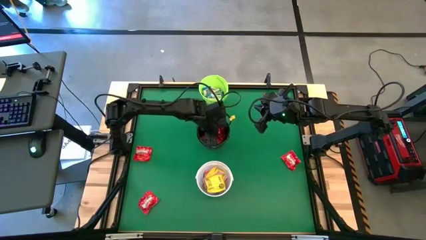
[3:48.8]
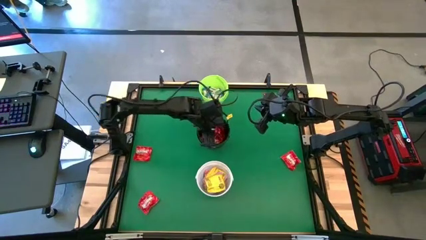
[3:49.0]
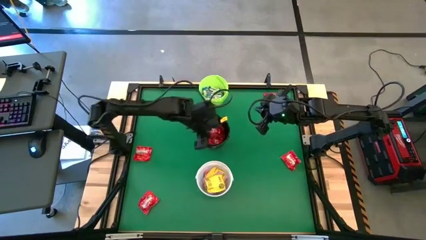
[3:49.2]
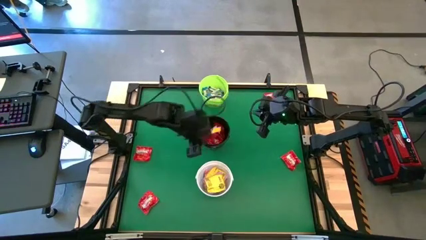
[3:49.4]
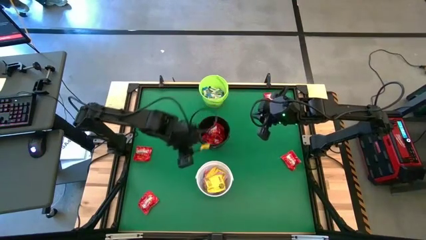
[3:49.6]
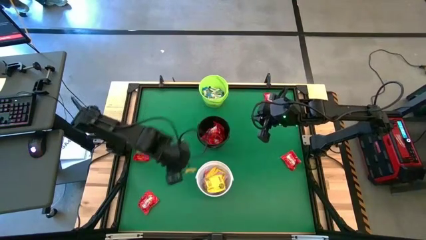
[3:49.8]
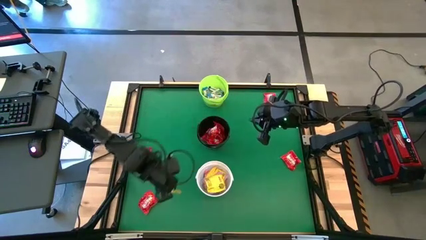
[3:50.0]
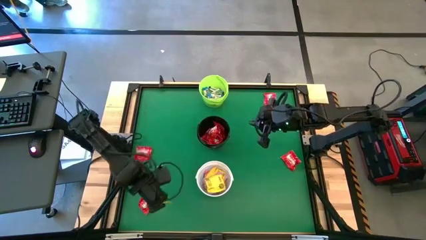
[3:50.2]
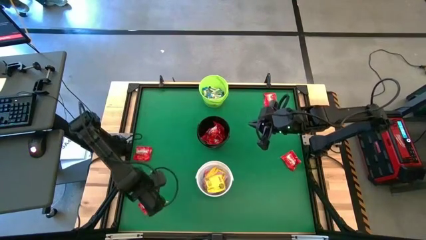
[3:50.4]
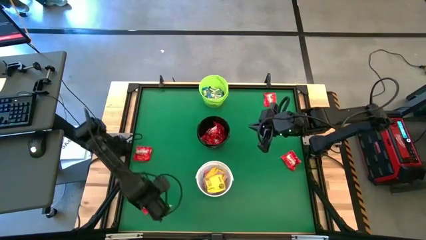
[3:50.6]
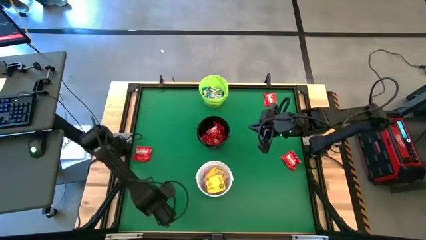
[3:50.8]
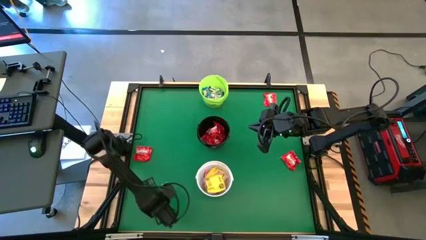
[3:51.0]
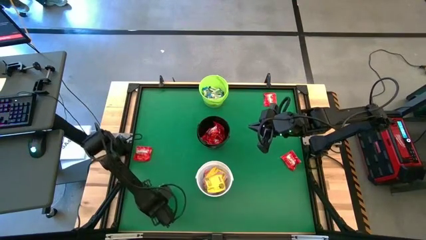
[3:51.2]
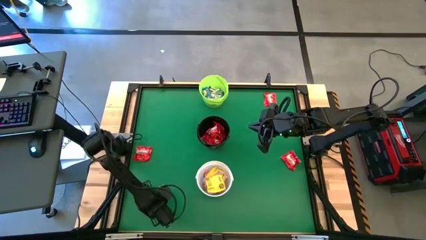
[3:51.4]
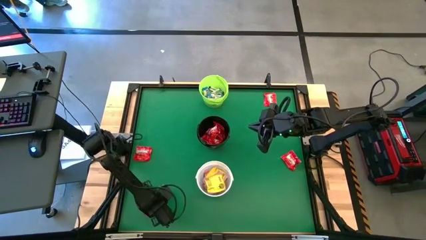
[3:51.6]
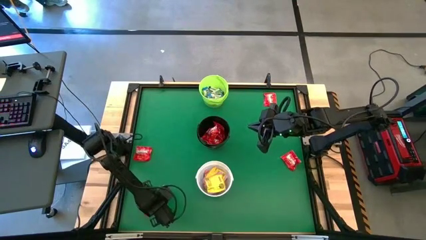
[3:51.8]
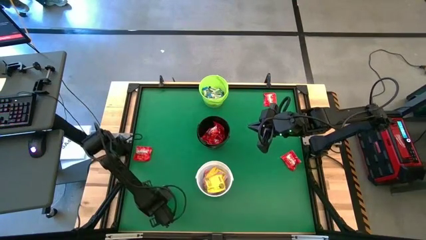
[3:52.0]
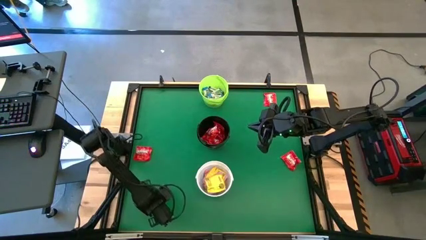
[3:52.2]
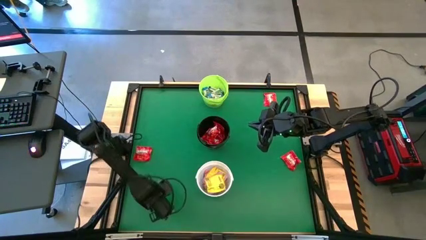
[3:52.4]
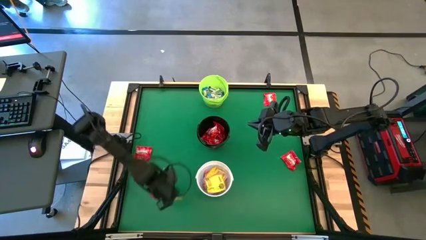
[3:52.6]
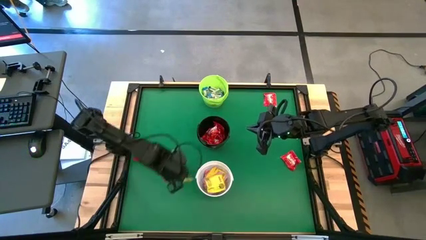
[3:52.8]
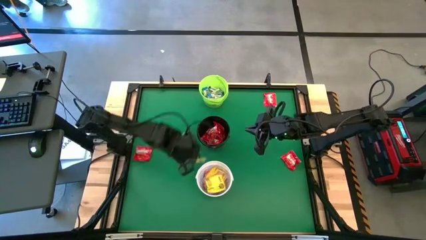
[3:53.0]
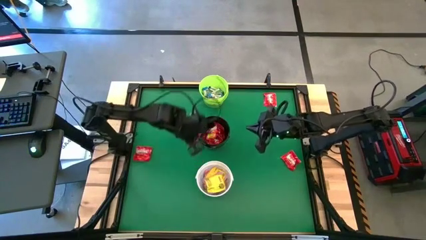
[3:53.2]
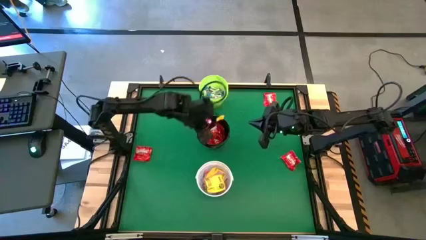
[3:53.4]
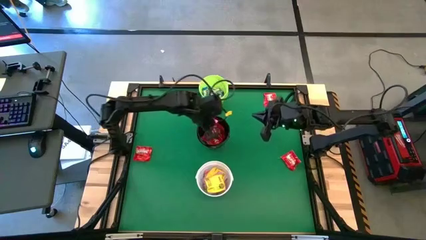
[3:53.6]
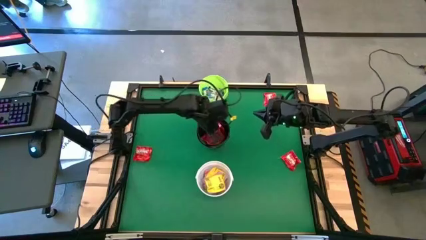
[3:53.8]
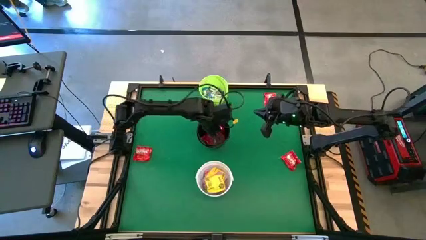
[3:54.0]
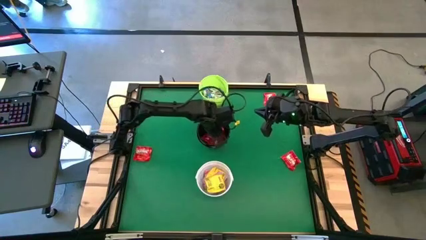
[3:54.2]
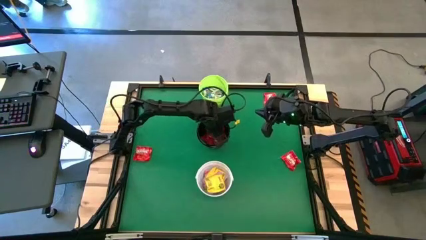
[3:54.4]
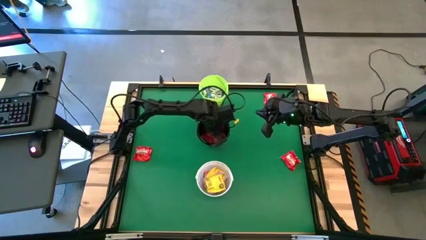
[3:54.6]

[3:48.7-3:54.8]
Task: Sort candy by brand, put in halloween buckets
Put the red chocolate into the black bucket

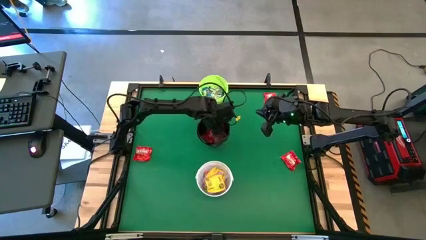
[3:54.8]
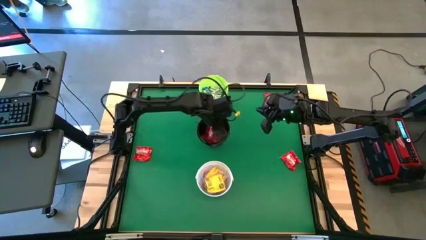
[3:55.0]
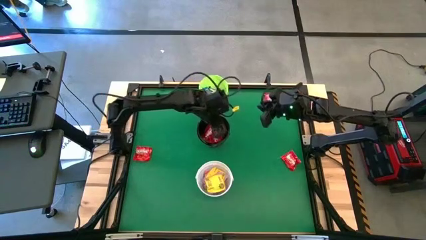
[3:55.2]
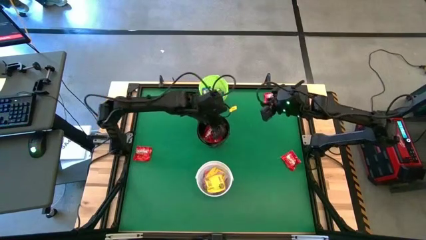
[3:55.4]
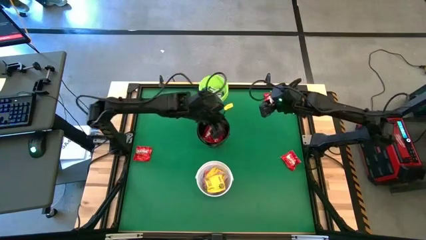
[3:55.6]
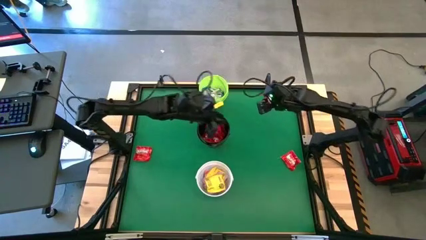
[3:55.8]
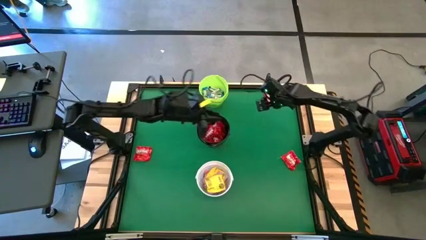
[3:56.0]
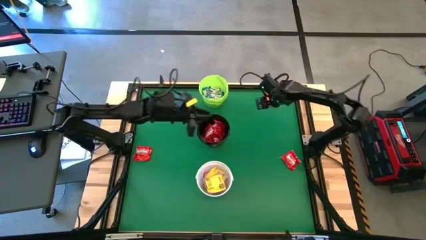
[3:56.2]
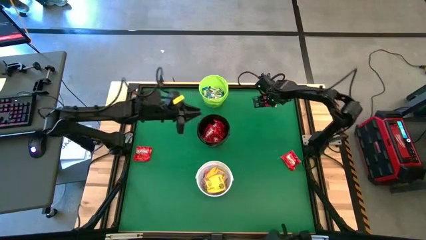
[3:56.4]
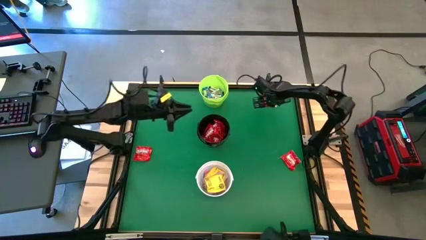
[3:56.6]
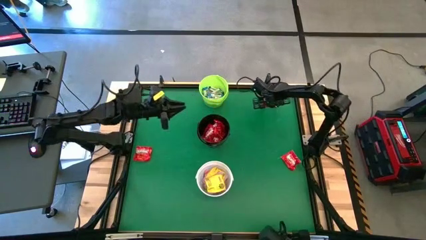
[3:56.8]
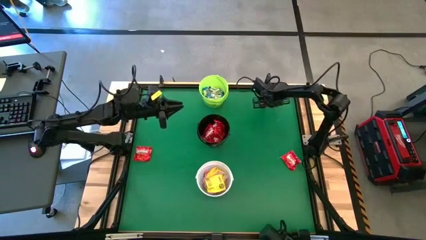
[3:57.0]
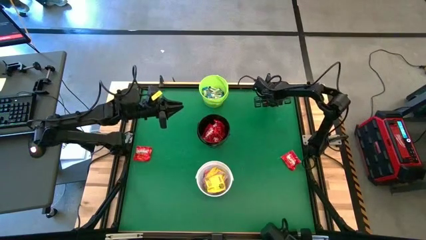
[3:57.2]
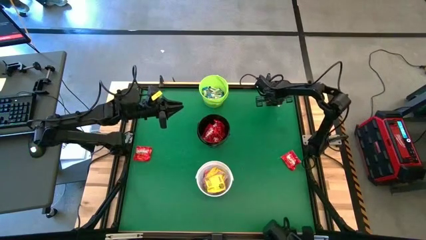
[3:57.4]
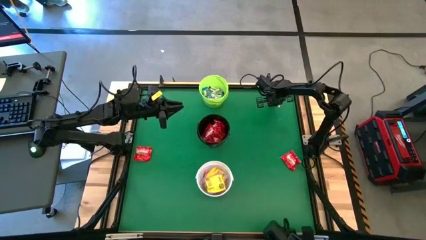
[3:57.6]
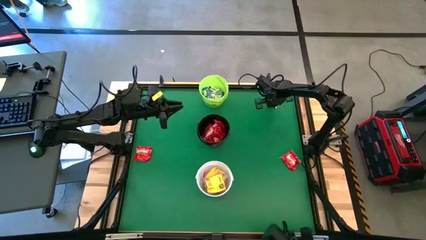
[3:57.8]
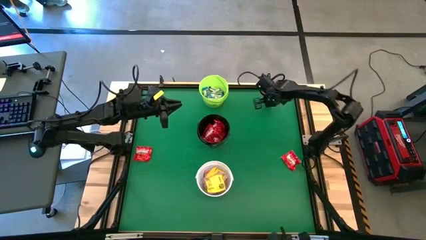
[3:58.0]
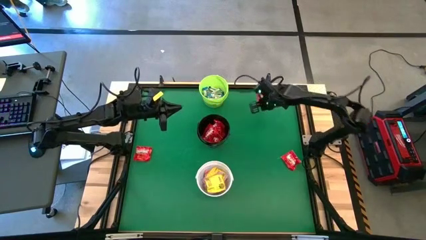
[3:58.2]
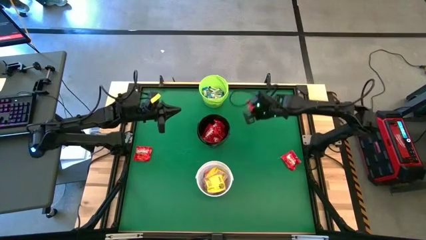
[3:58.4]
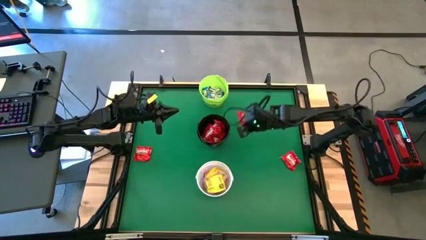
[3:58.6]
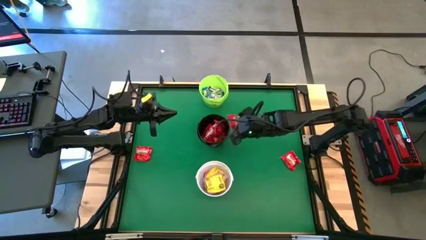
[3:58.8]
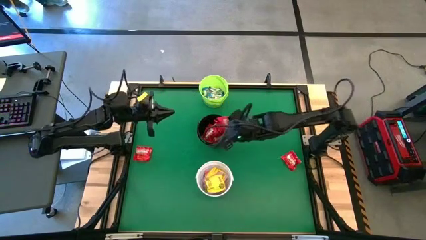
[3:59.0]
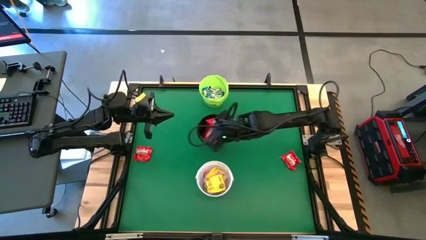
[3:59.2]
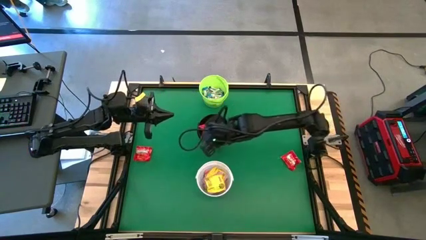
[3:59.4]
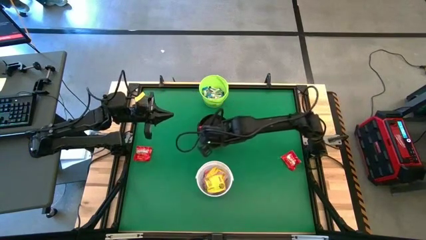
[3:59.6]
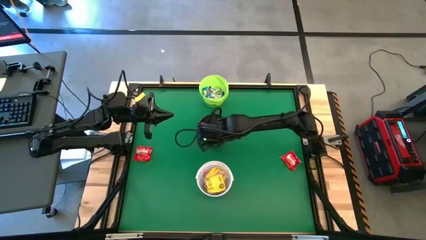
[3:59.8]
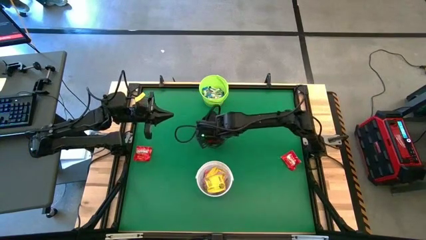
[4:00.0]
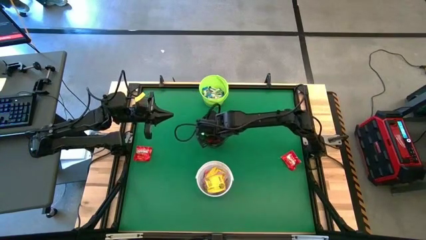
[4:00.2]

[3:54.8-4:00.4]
Put the red chocolate into the black bucket

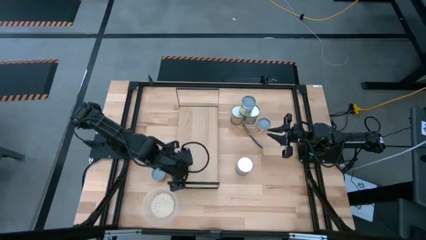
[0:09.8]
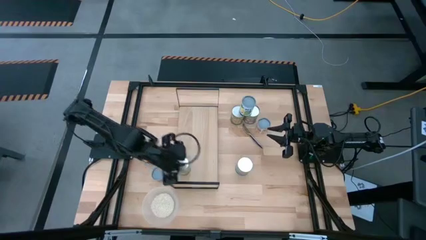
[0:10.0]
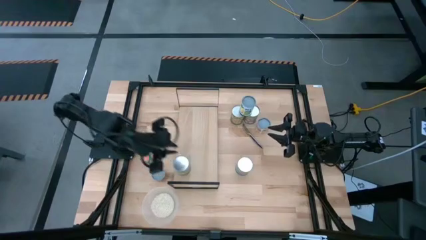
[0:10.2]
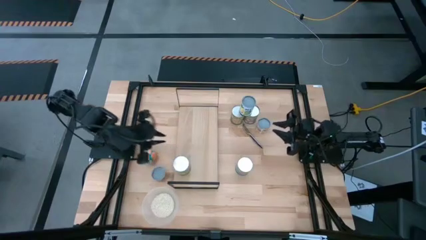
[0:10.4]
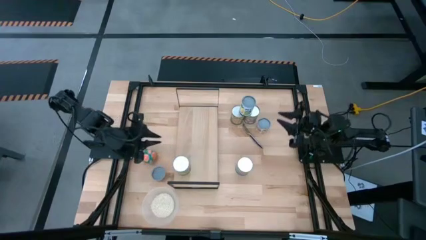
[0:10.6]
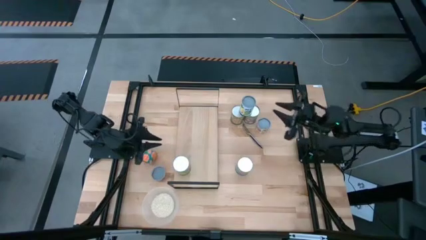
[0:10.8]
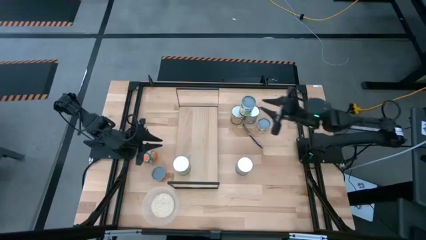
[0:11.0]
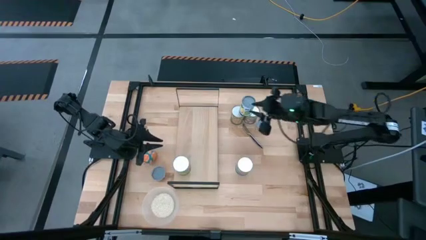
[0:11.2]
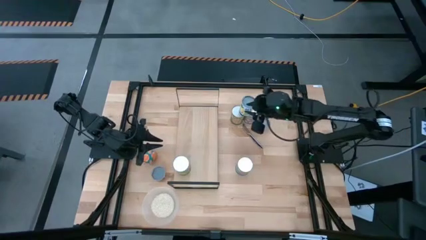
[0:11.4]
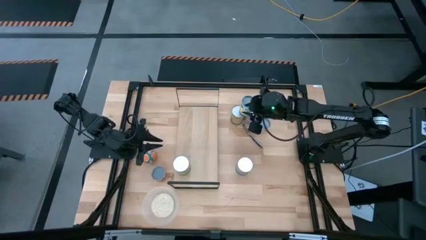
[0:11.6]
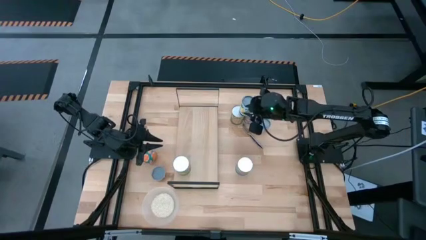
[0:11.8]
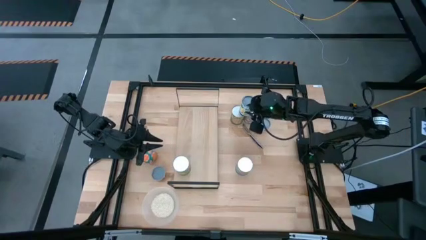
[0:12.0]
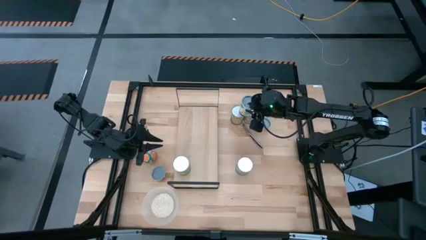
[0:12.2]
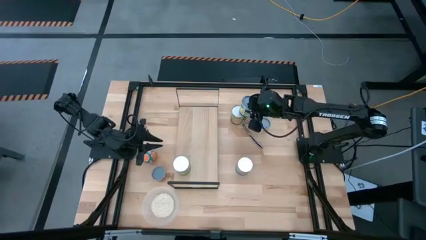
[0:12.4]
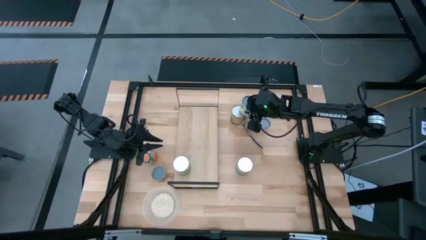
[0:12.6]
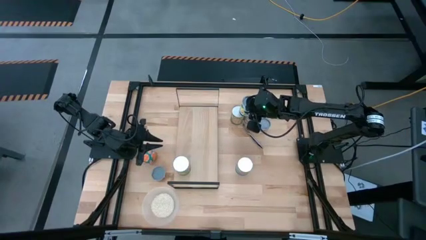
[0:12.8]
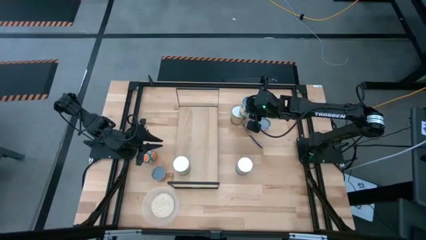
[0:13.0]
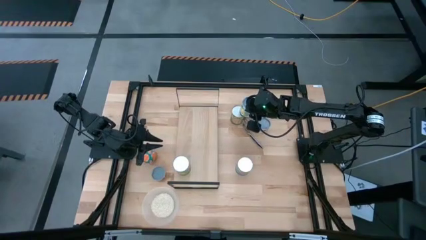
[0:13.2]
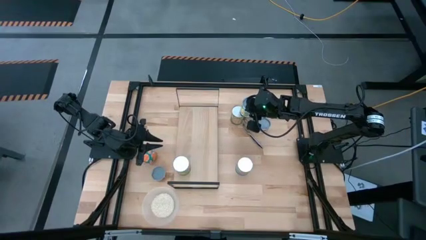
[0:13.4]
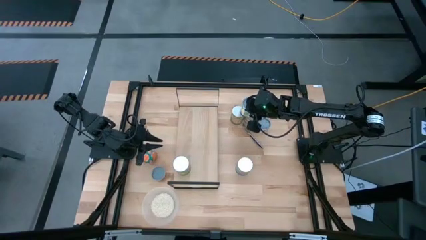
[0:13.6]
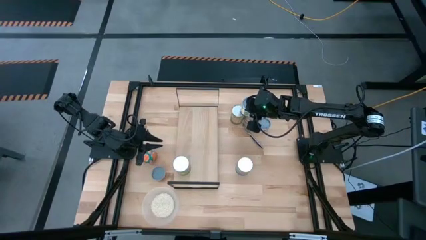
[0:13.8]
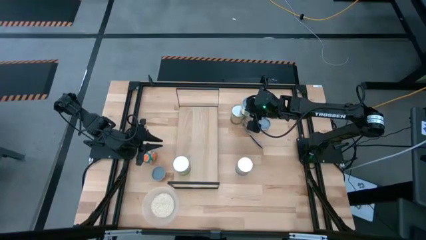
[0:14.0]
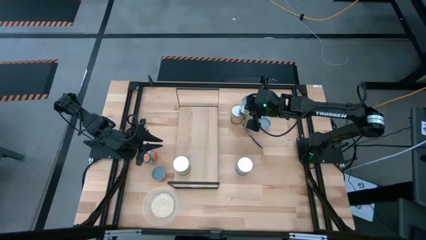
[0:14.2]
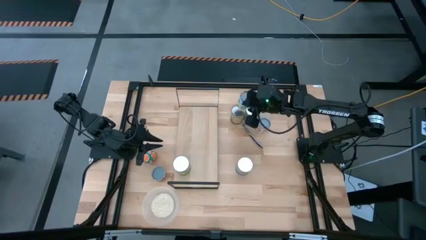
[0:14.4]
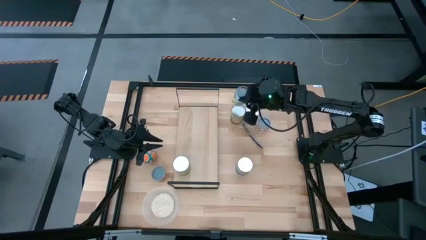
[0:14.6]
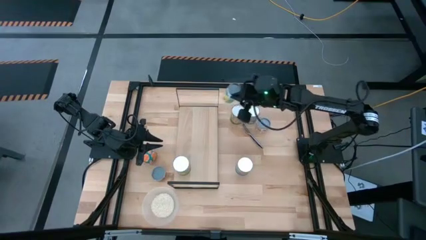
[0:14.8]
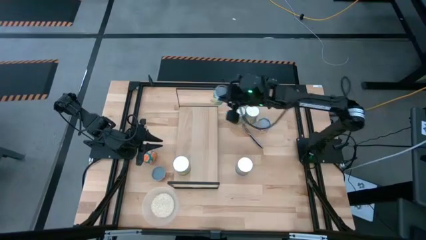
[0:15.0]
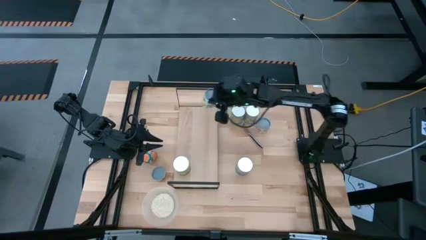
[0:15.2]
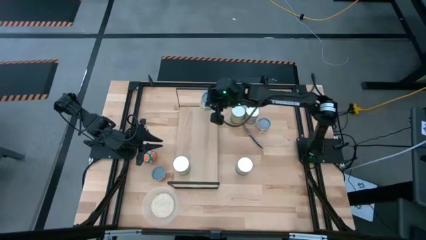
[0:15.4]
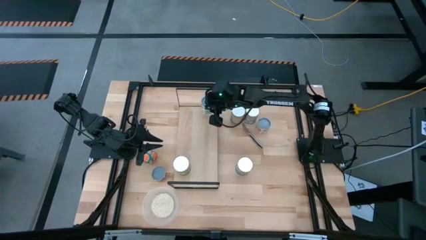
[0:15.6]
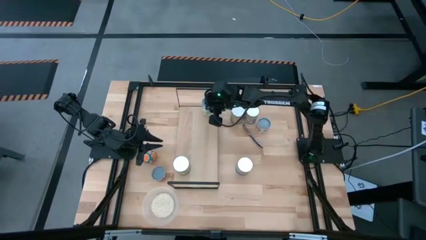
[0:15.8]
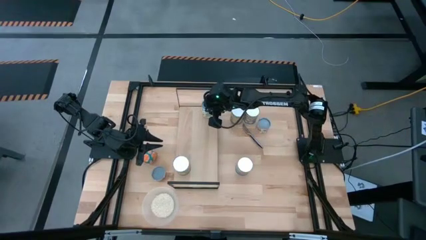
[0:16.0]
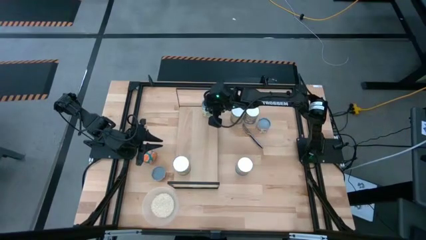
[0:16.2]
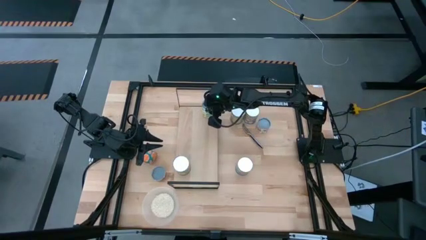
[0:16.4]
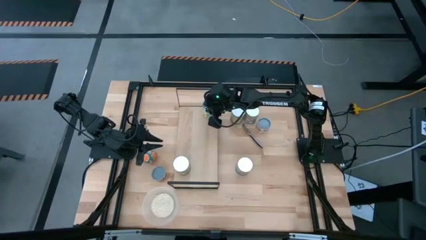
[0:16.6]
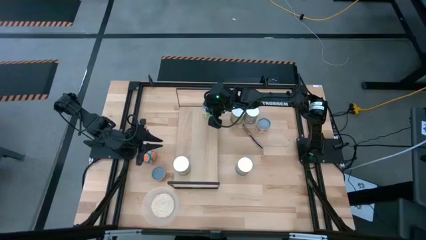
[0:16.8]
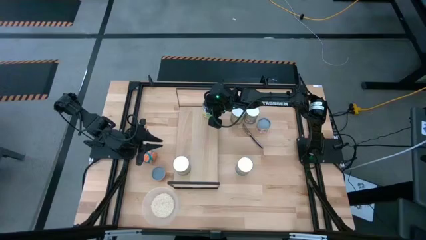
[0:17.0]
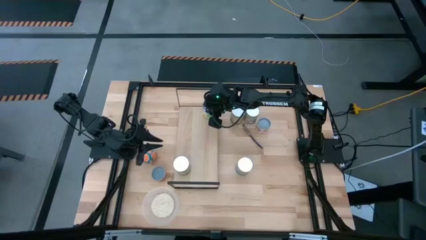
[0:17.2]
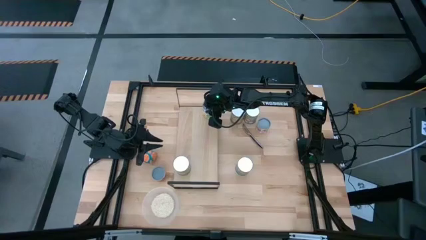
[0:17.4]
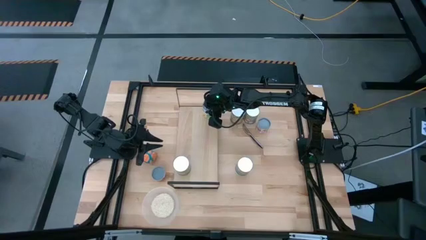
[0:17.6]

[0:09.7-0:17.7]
Task: Pick and place cans onto a shelf
Put the canned mixed fruits on the shelf
